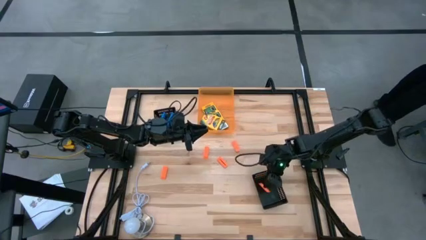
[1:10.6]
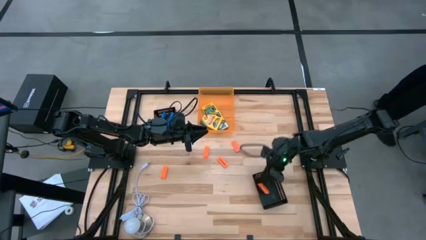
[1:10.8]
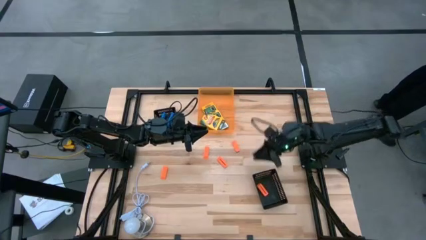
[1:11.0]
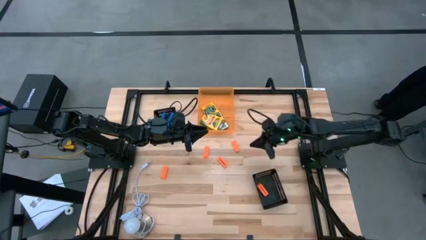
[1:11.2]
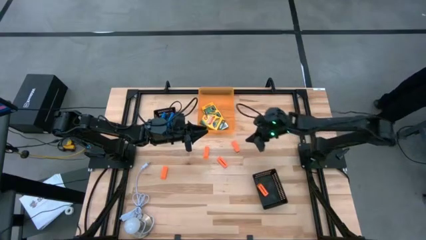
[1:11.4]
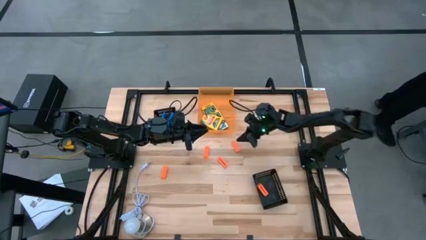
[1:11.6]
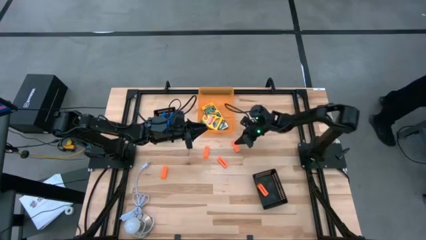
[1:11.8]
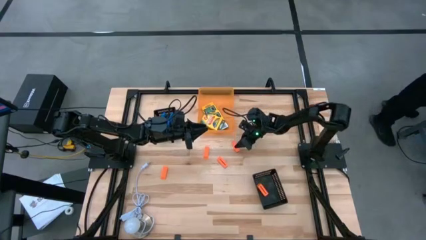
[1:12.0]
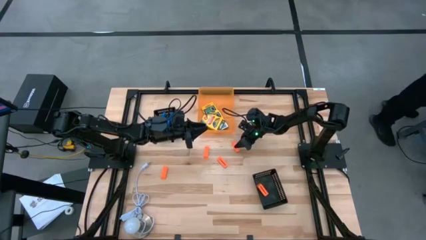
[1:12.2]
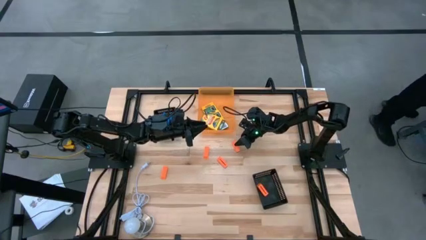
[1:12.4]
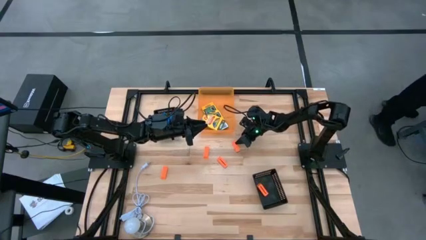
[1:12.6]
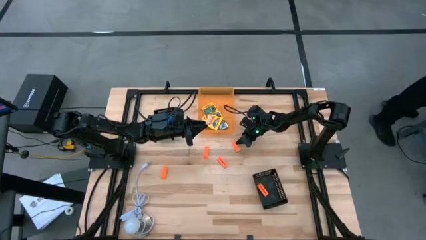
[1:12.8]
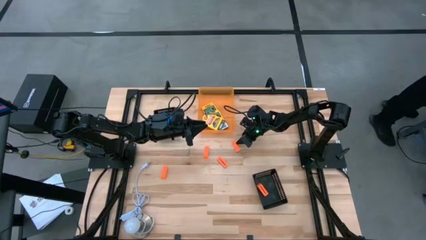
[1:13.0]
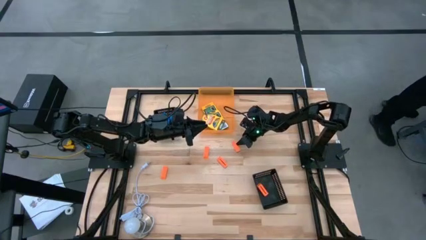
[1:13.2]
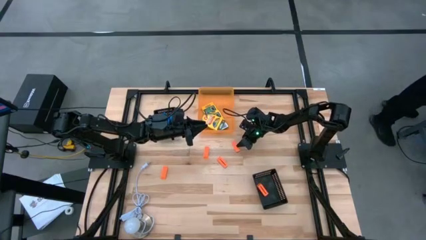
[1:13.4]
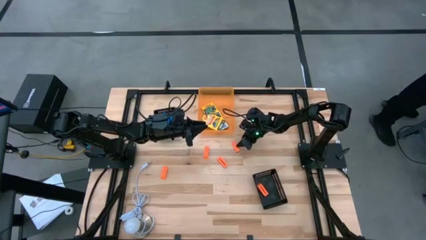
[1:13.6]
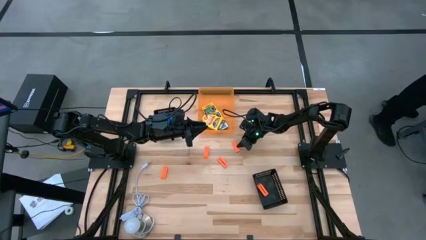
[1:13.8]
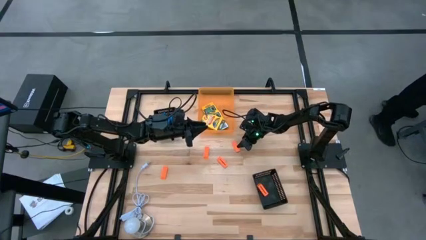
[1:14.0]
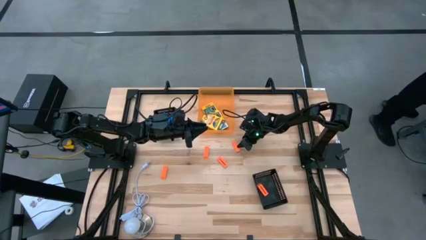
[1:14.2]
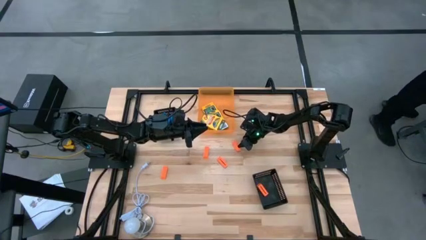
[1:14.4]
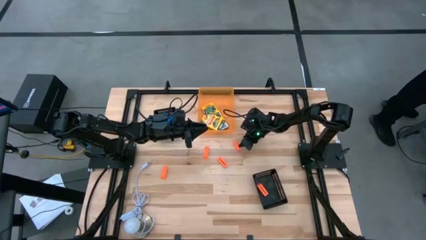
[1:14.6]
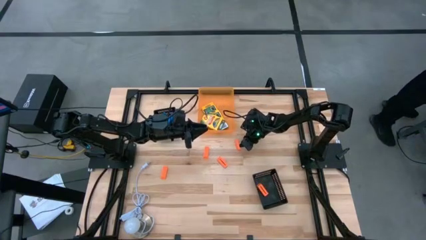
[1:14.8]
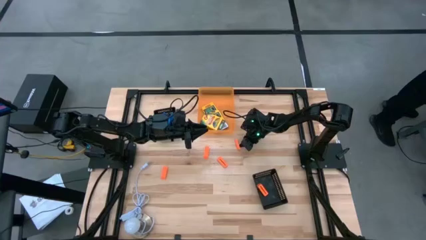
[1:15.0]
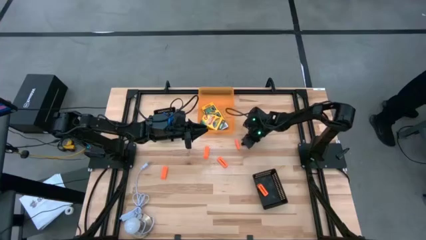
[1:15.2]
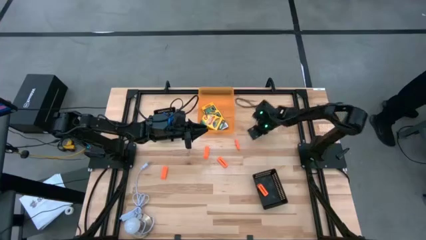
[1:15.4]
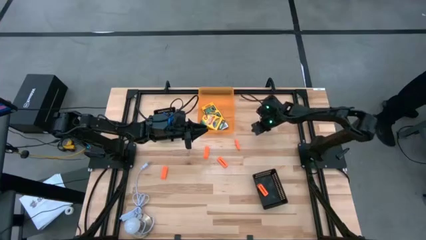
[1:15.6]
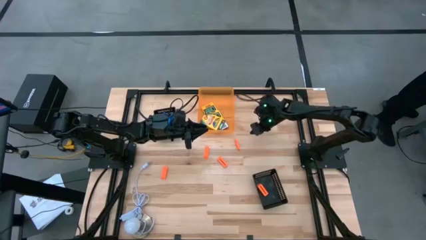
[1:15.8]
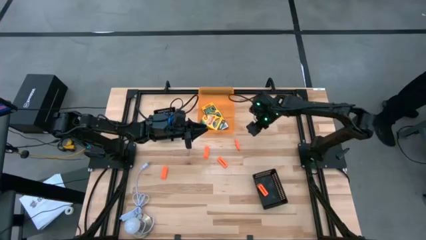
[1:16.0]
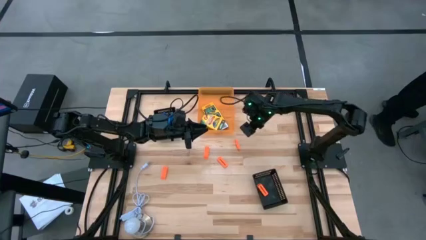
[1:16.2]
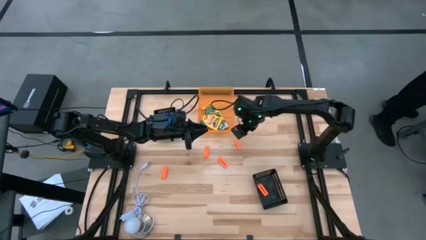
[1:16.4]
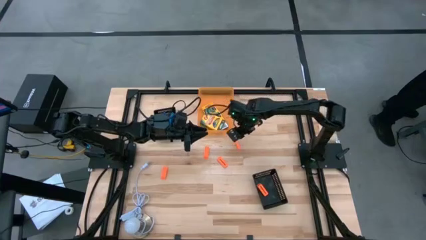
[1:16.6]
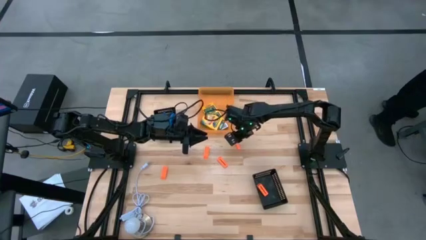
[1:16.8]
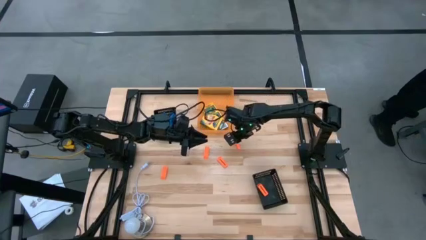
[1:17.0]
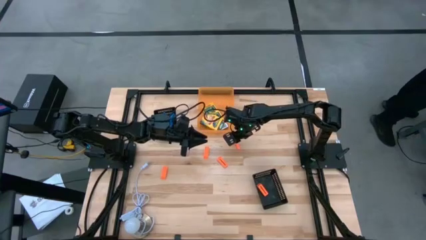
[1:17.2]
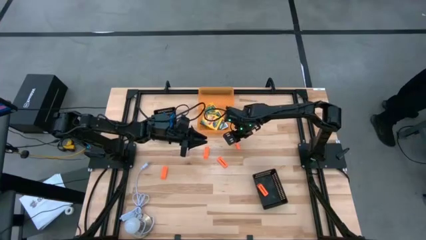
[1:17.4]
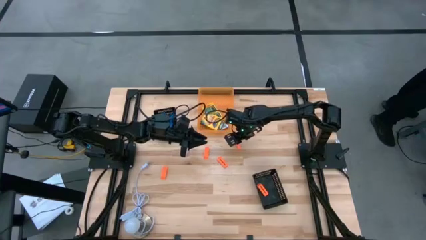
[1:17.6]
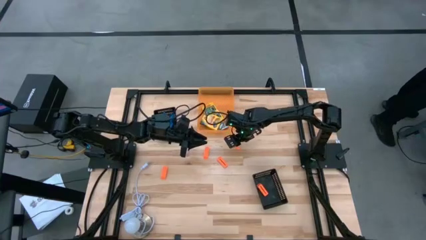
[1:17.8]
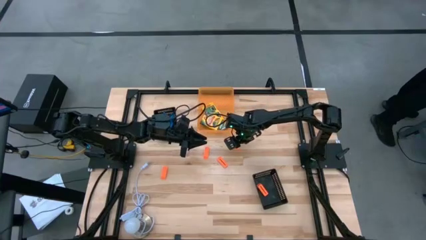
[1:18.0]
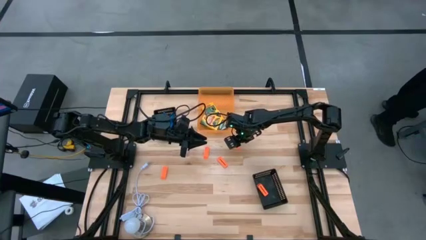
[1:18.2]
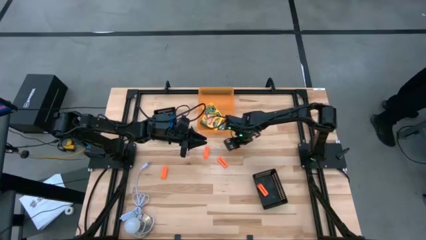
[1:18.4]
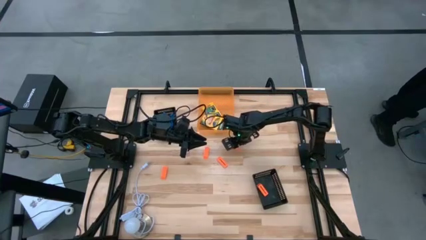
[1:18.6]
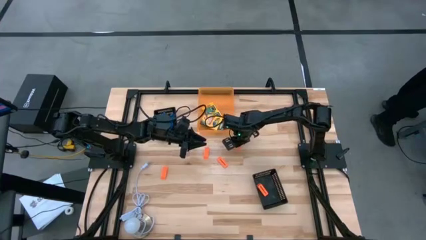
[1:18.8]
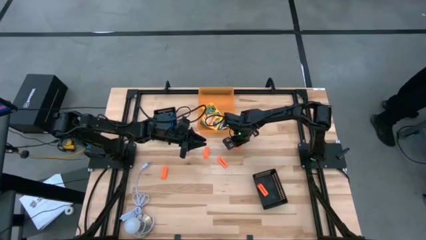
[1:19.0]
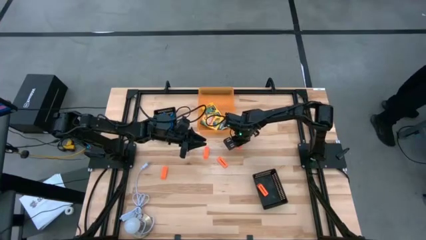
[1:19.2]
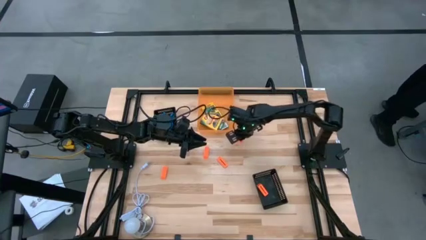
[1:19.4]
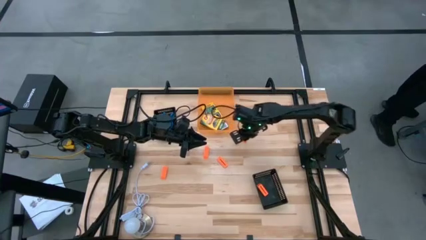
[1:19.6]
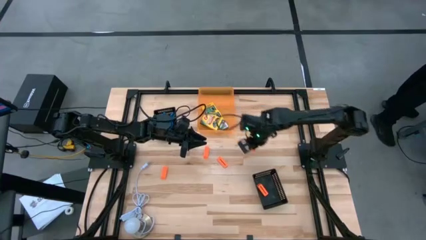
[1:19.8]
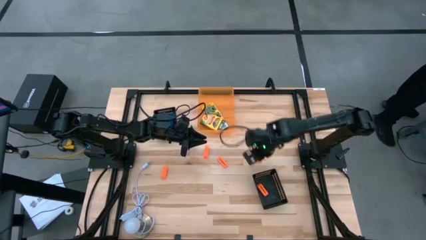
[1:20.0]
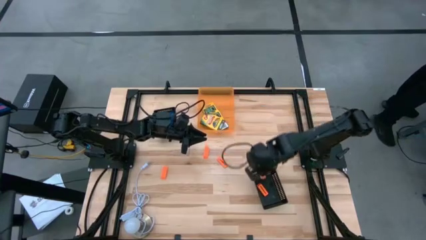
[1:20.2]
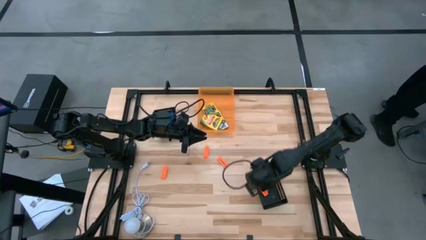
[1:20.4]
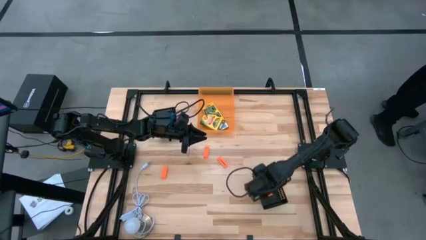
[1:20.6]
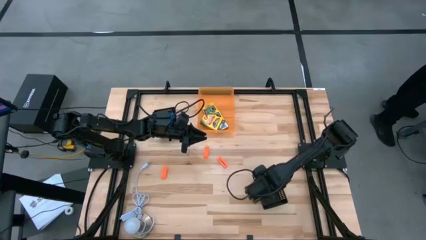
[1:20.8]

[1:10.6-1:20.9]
Task: Pick & Place School Supplies
Put the orange eraser into the bottom black bin

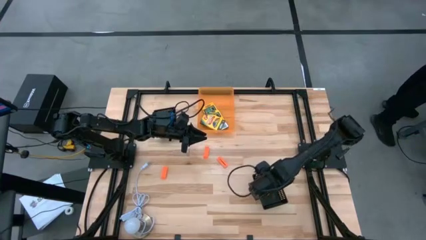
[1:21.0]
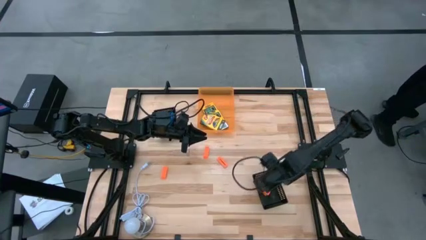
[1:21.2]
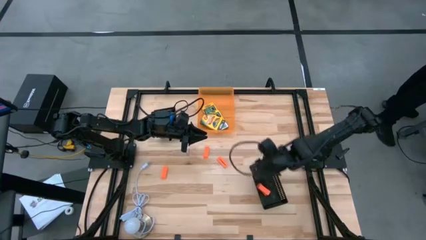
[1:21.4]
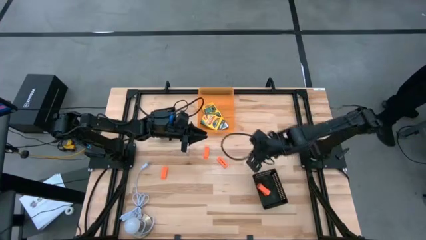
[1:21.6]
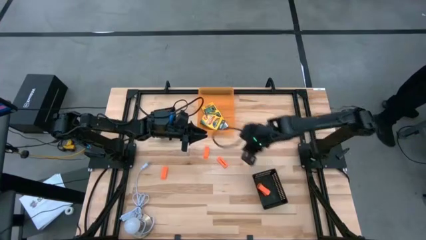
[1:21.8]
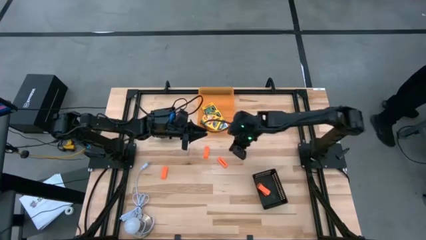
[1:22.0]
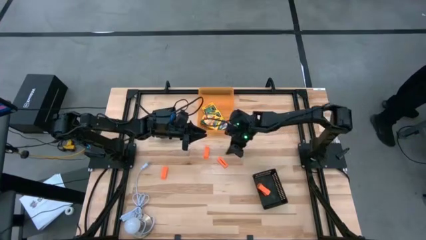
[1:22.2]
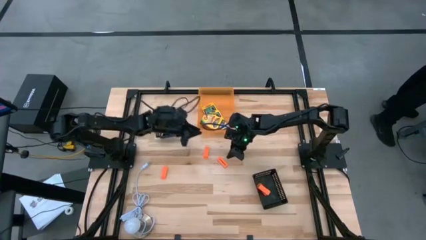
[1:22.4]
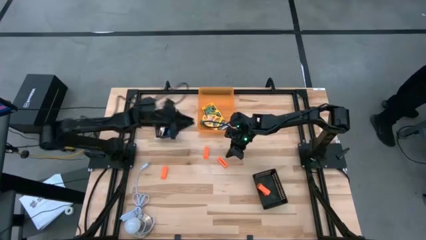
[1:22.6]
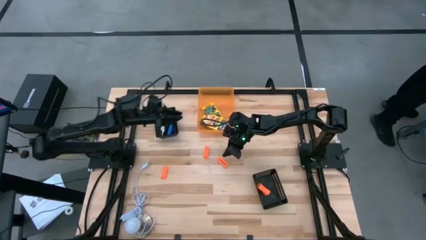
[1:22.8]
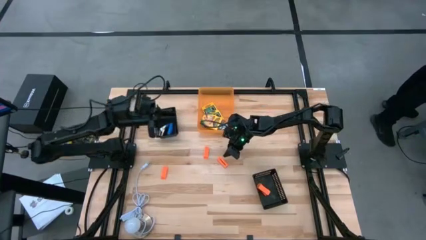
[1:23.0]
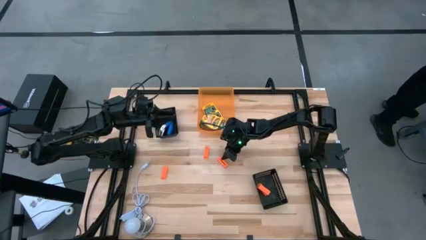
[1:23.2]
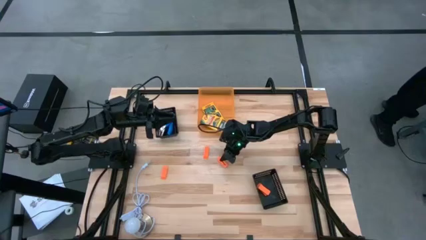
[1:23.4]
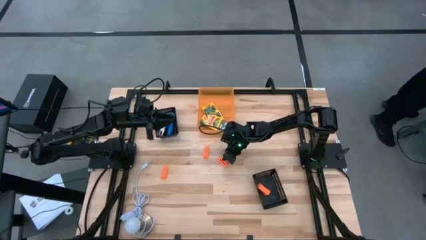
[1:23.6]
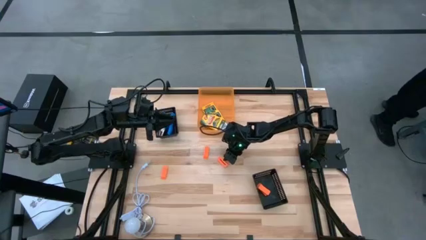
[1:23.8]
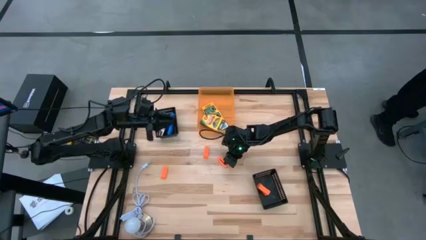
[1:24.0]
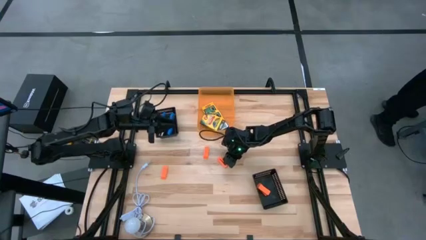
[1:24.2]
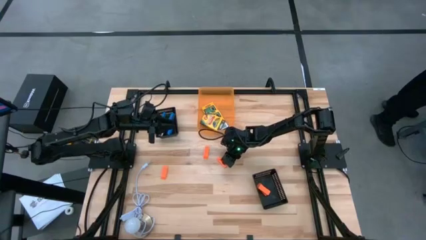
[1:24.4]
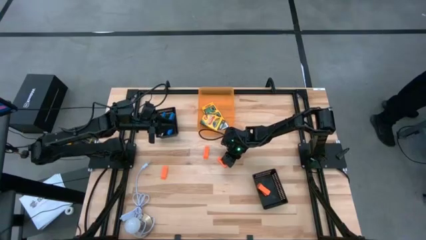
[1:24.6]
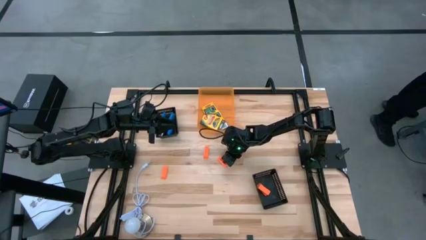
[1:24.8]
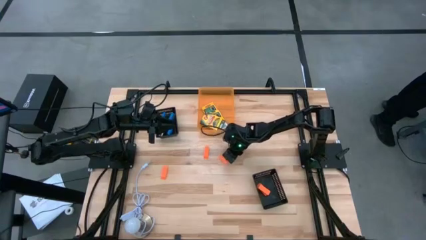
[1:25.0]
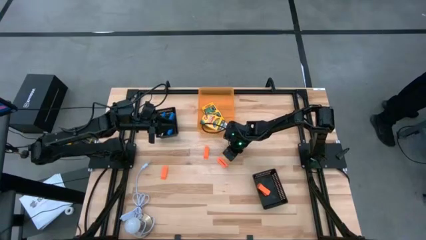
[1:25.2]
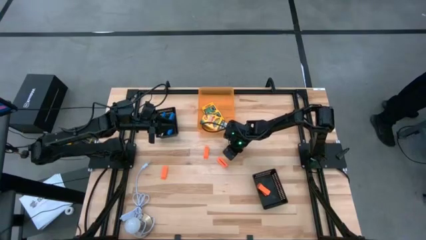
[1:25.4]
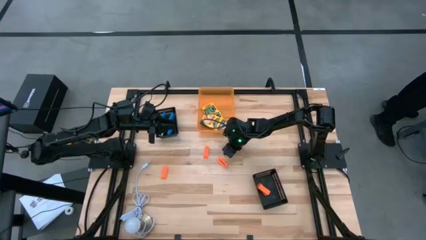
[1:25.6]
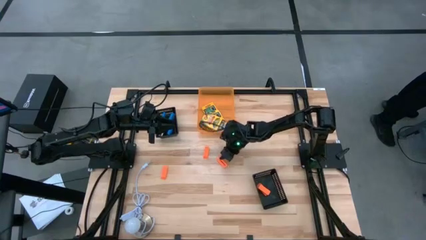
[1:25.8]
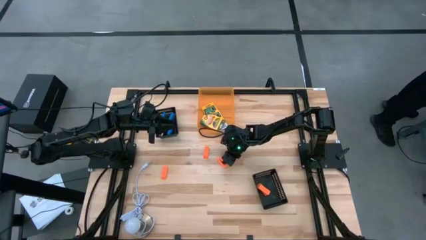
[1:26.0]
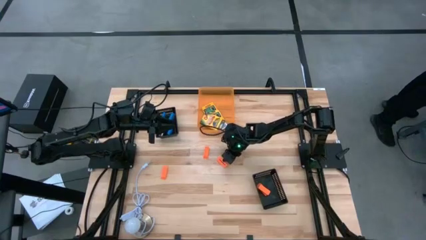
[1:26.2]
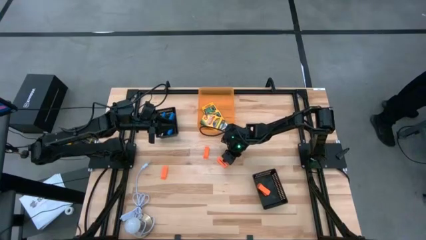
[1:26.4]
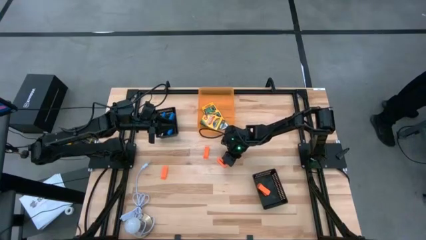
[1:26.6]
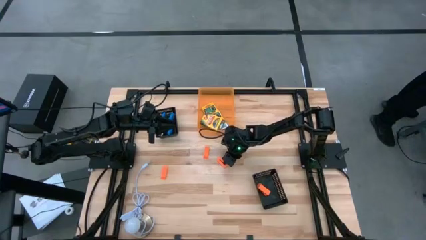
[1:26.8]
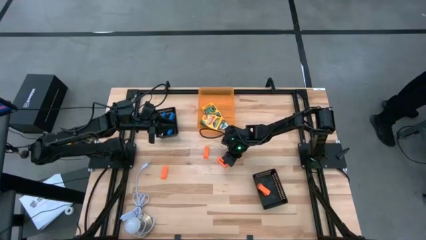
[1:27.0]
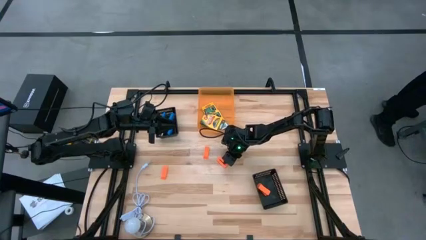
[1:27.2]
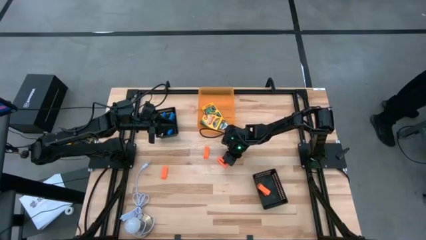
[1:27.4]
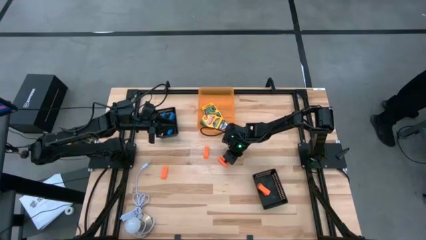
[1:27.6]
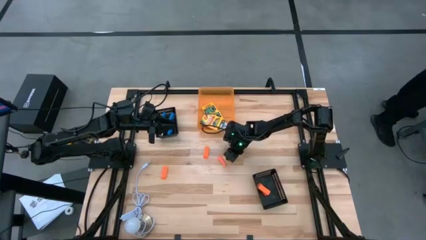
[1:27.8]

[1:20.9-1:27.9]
Put the orange eraser into the bottom black bin
